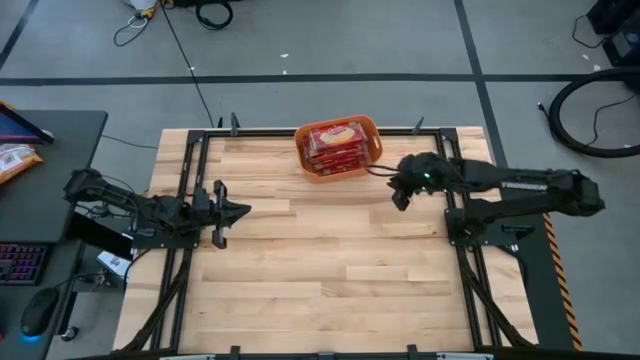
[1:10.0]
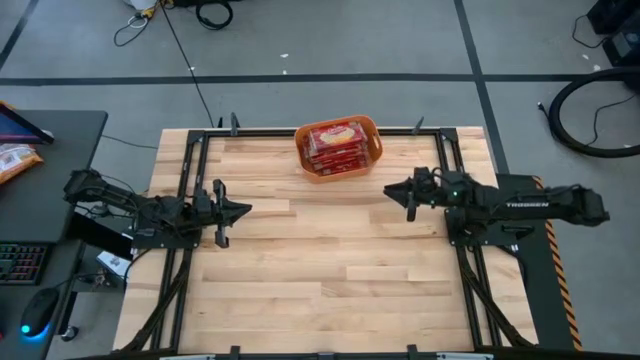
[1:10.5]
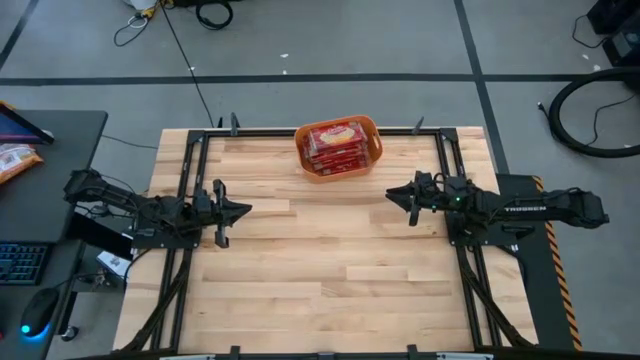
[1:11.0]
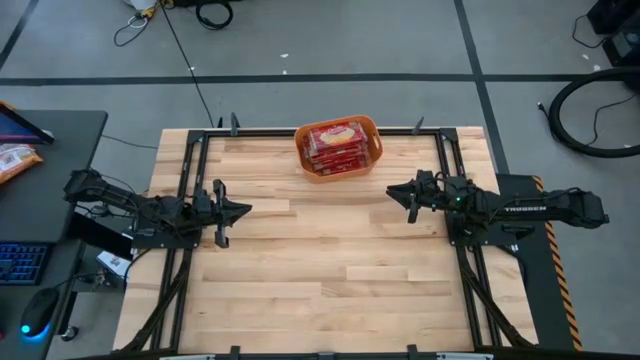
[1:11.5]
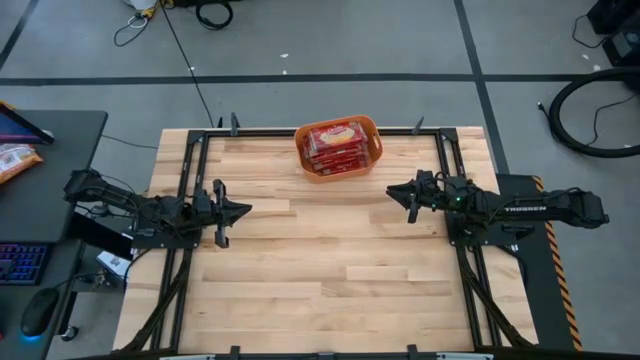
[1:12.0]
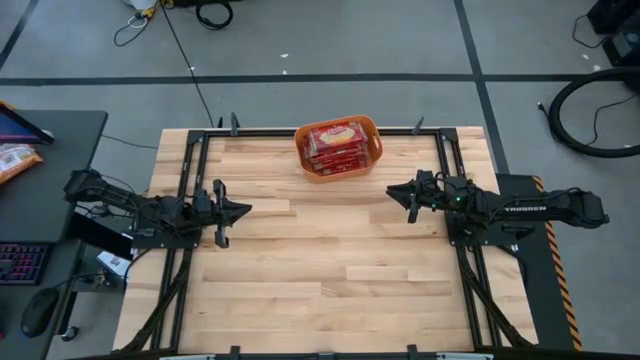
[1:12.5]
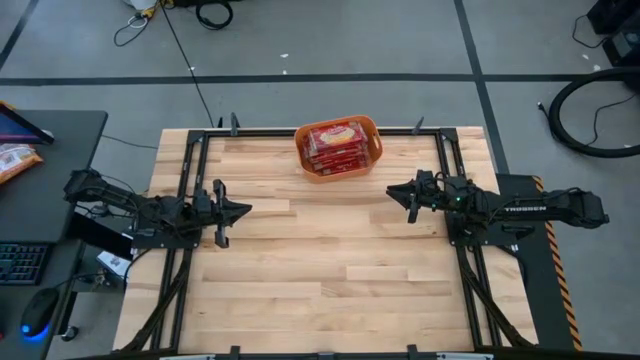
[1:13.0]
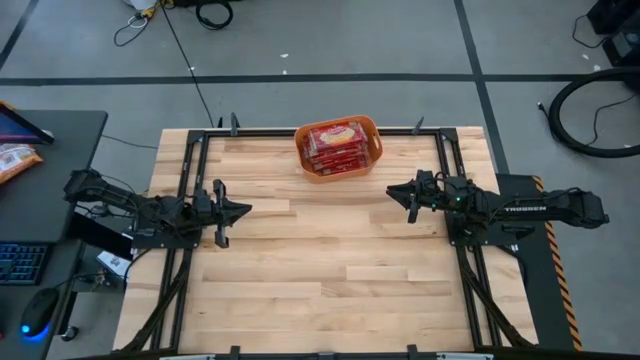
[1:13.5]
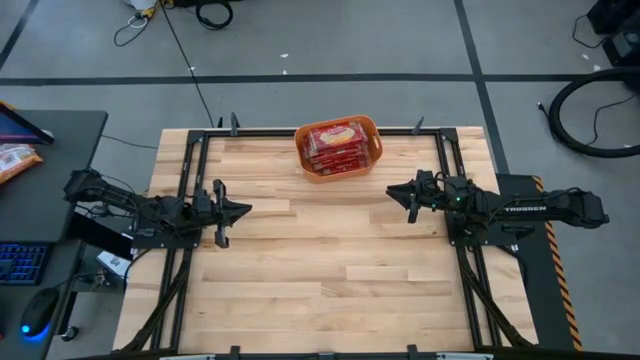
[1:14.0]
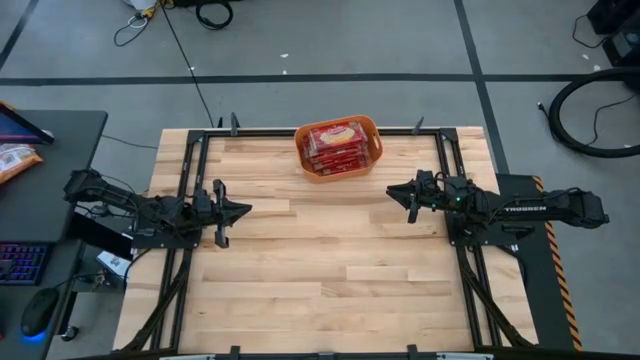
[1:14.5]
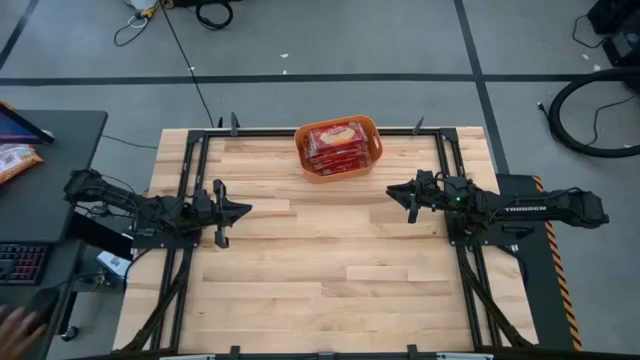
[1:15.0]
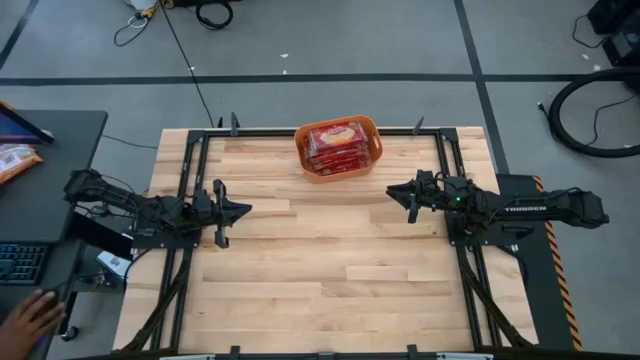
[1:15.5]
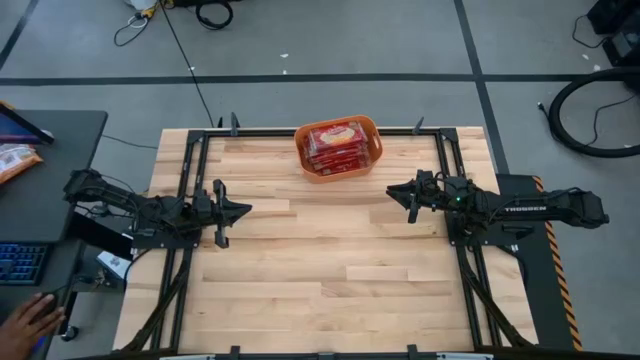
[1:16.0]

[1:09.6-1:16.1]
Task: Sort popcorn bags into baskets
Return to Home Position

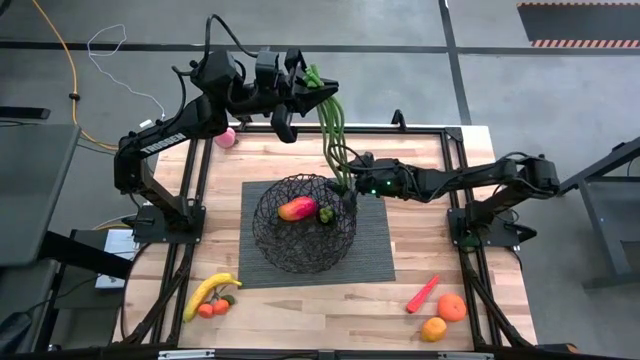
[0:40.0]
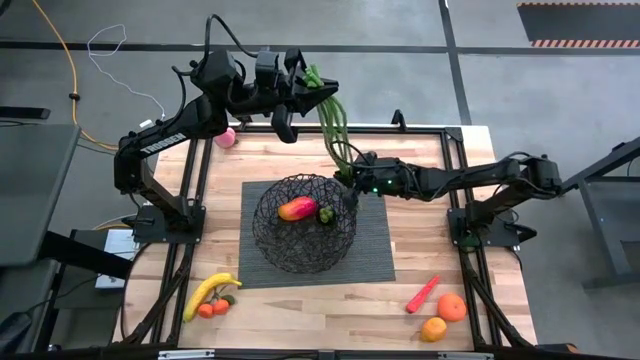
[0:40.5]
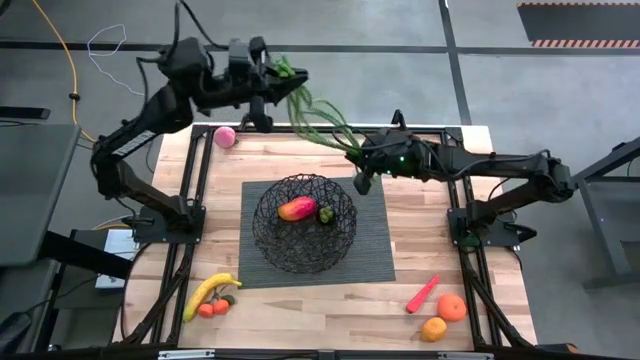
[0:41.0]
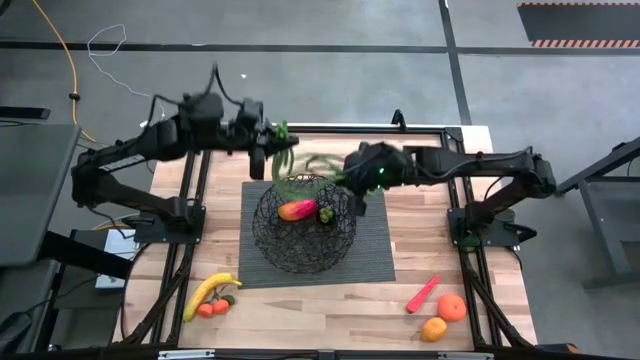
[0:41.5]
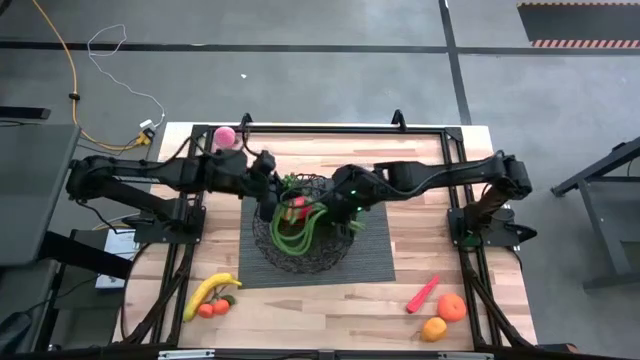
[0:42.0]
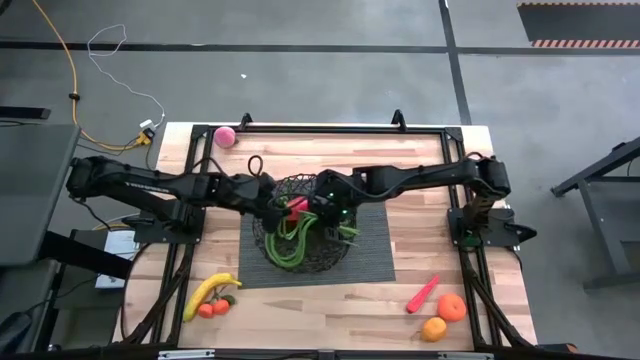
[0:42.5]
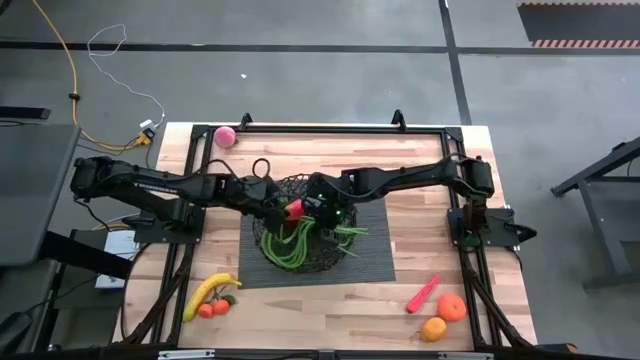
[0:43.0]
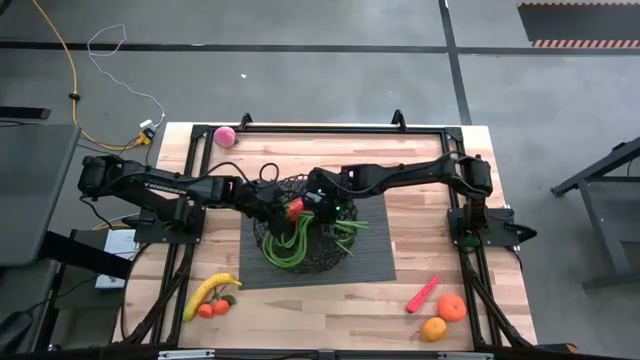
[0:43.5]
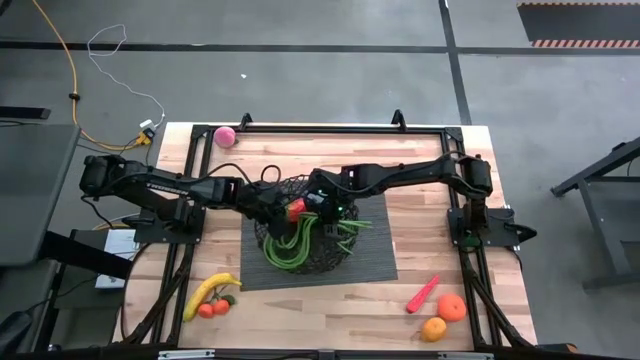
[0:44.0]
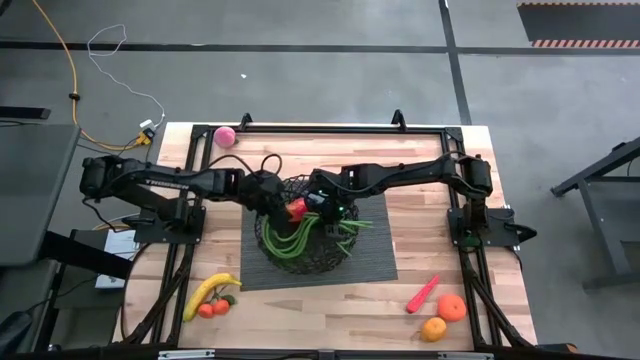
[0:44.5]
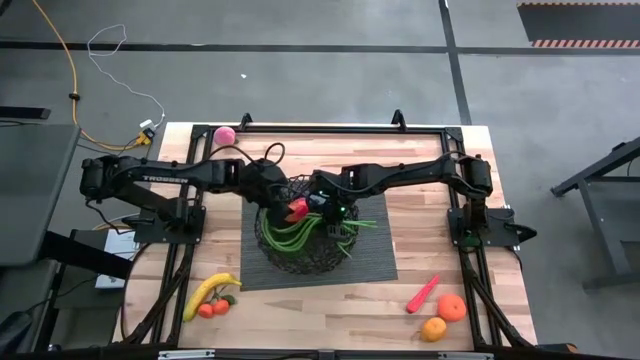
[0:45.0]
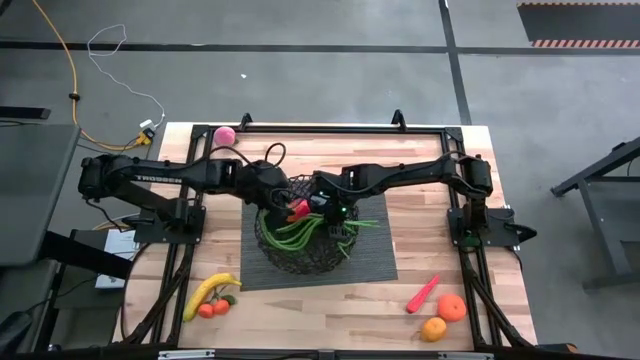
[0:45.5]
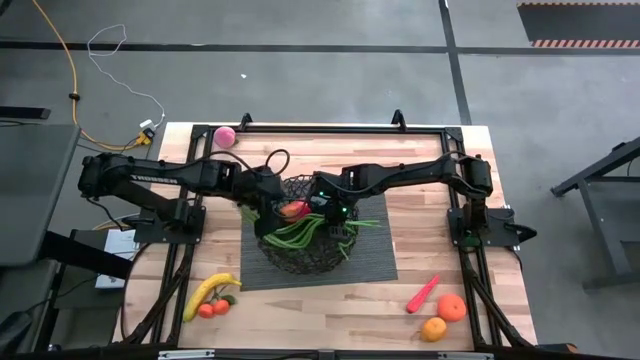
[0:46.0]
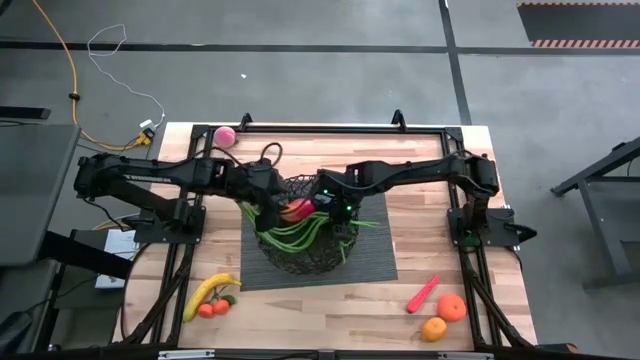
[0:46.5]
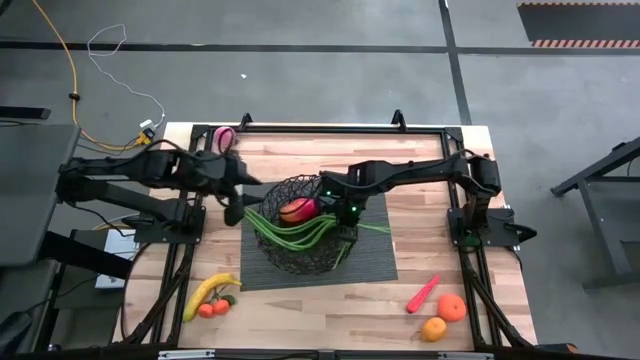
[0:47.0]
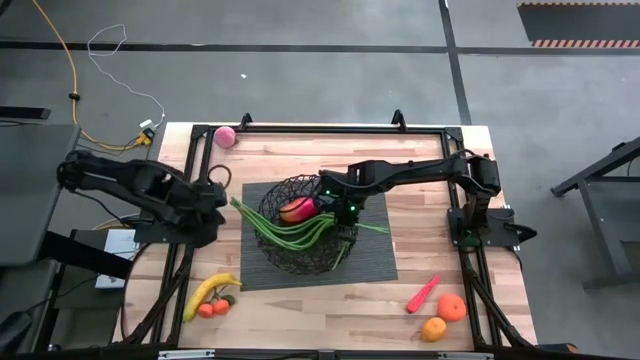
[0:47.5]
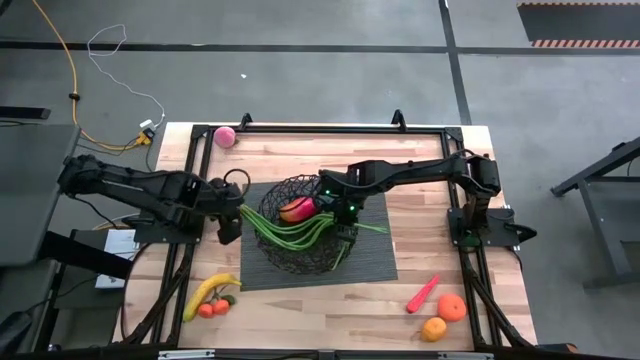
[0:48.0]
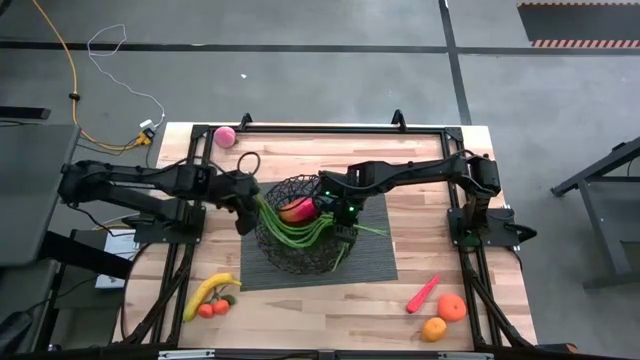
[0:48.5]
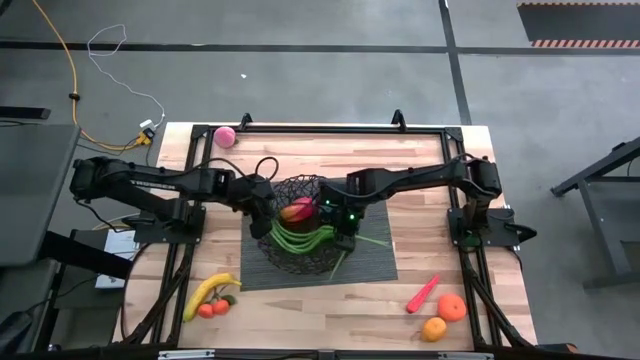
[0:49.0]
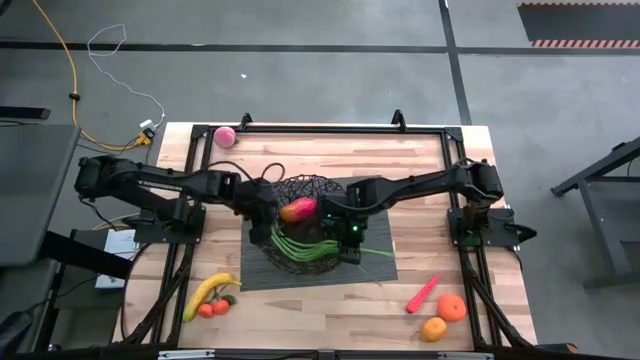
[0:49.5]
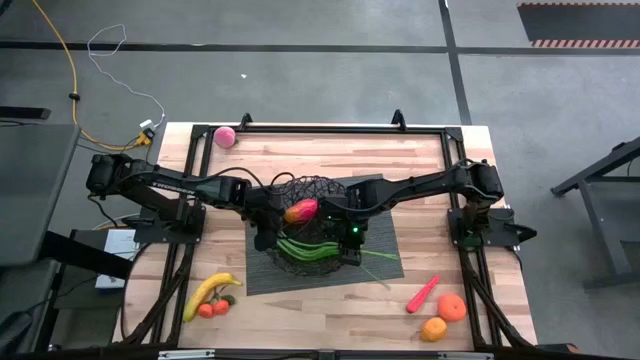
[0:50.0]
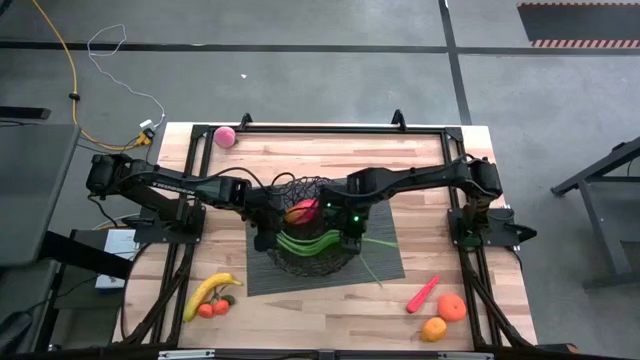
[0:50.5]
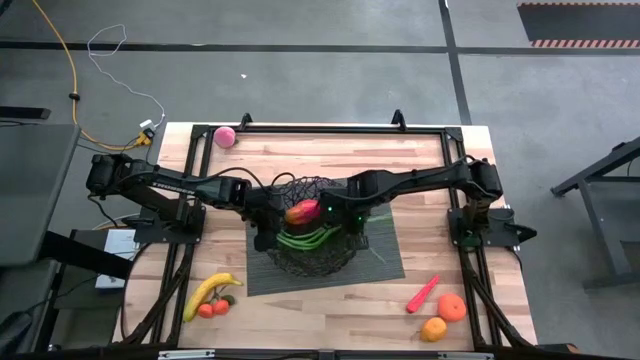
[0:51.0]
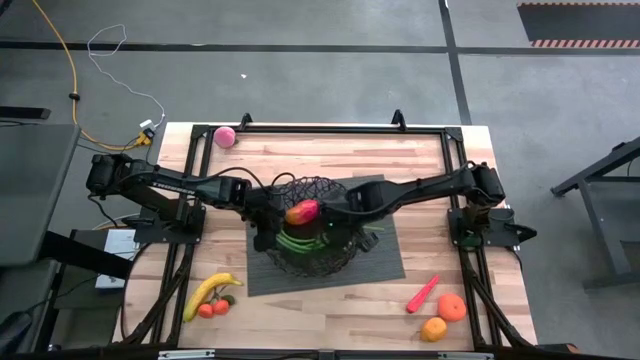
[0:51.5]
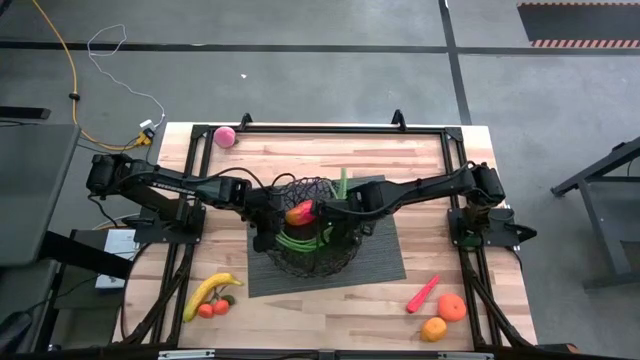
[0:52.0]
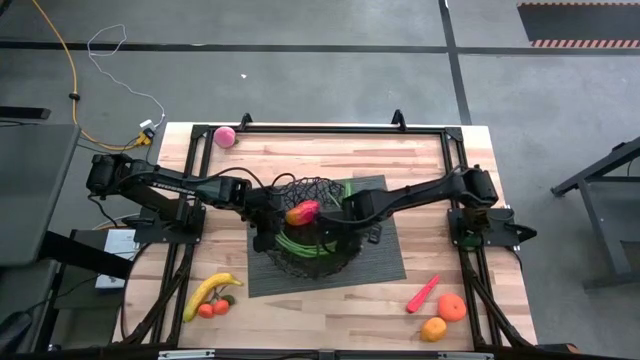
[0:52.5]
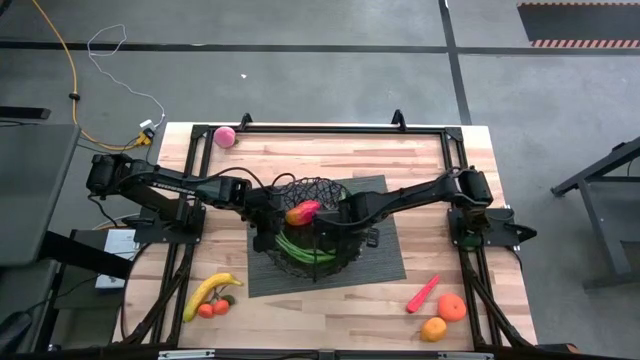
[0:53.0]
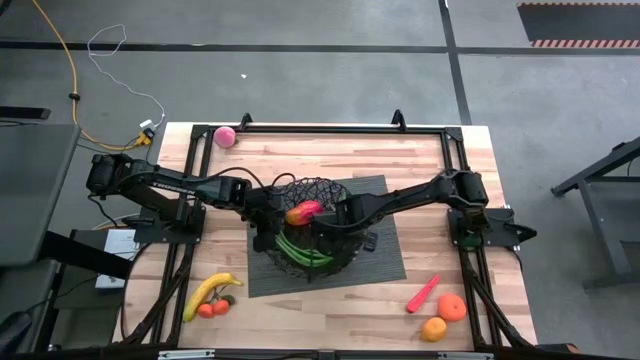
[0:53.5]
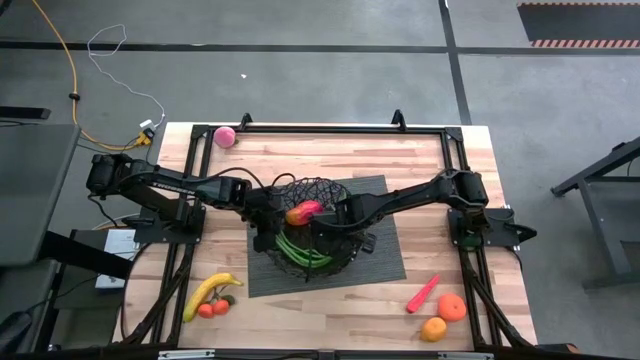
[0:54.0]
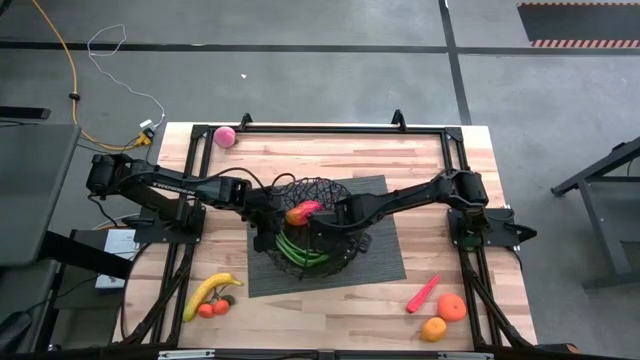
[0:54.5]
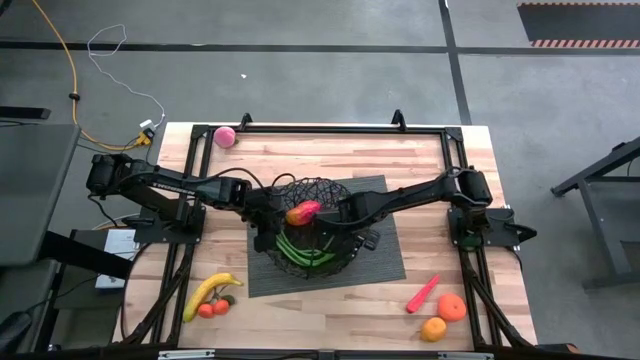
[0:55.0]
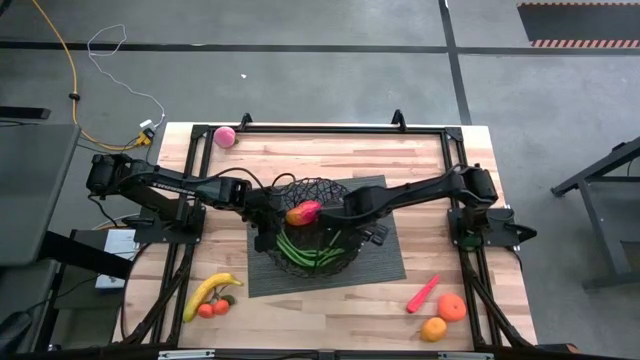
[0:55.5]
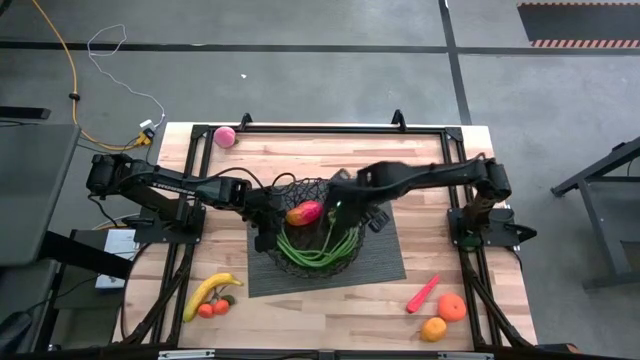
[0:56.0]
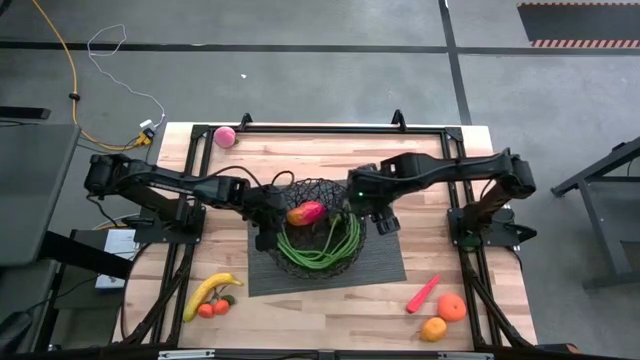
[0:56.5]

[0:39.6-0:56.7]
Task: Build produce basket
Put the green beans into the black mesh basket
